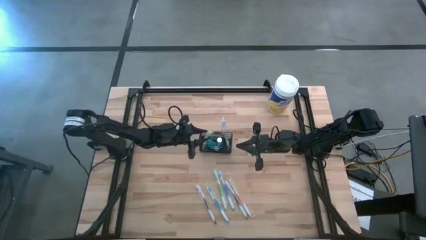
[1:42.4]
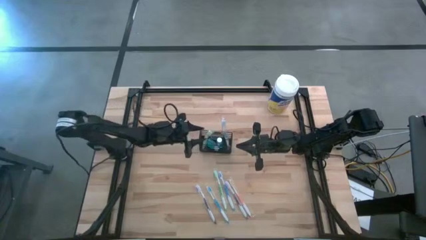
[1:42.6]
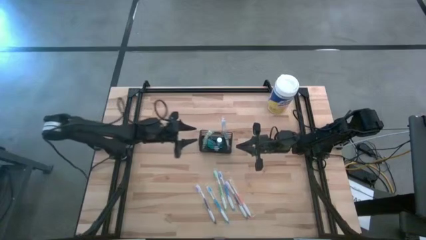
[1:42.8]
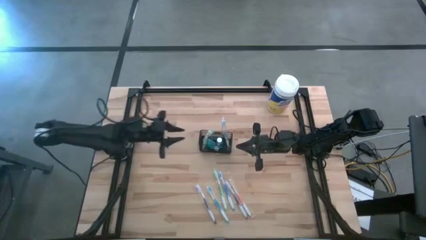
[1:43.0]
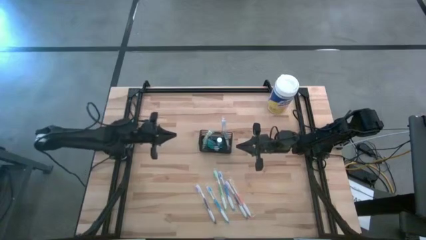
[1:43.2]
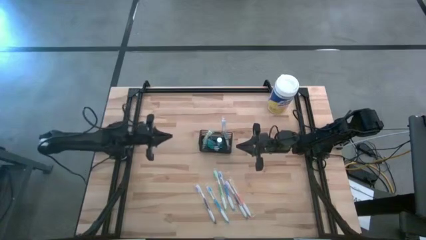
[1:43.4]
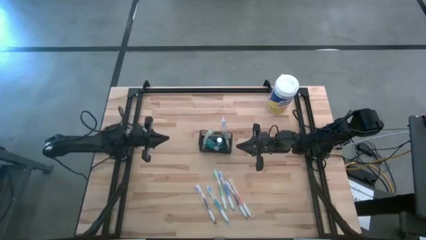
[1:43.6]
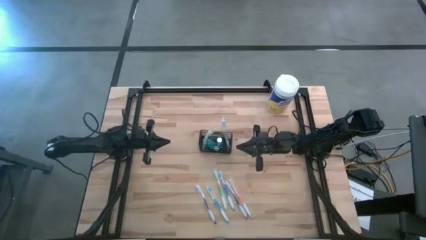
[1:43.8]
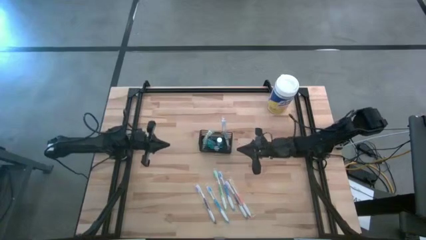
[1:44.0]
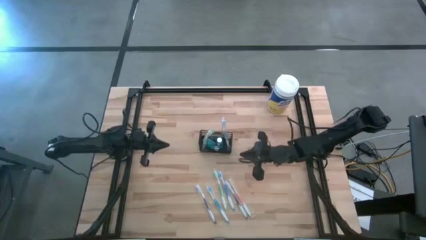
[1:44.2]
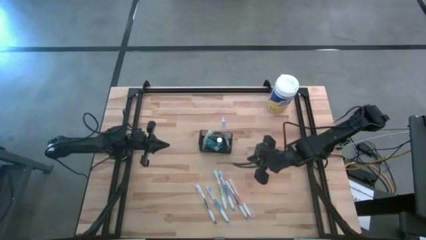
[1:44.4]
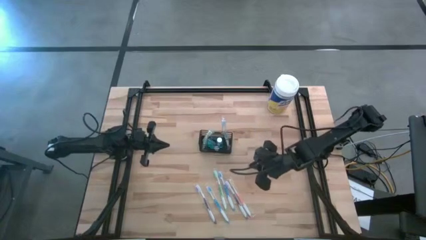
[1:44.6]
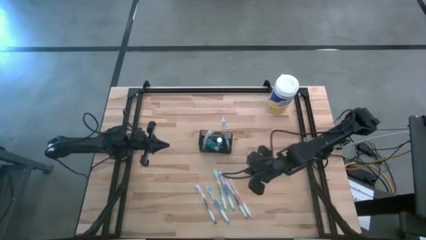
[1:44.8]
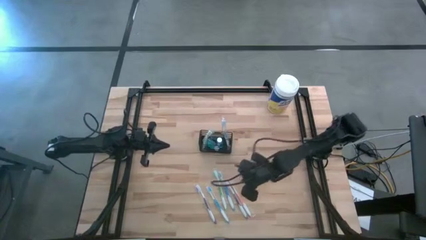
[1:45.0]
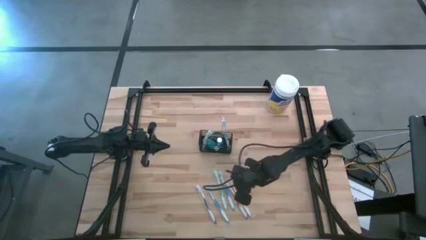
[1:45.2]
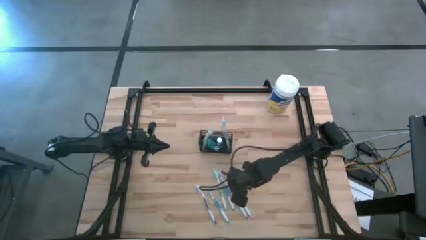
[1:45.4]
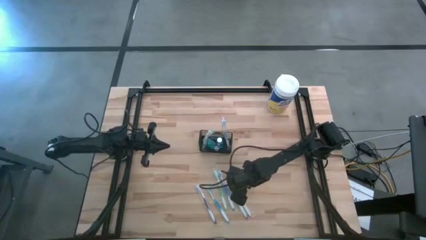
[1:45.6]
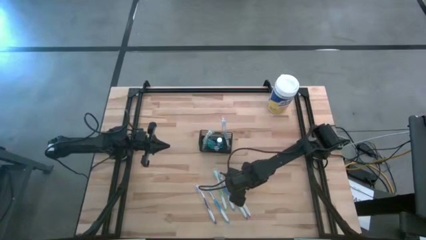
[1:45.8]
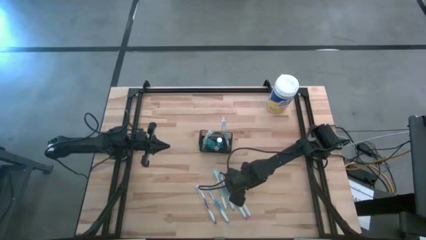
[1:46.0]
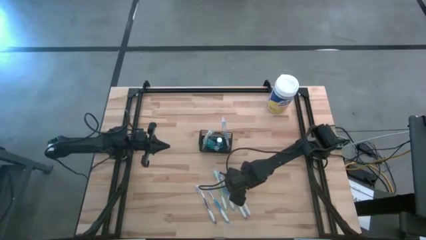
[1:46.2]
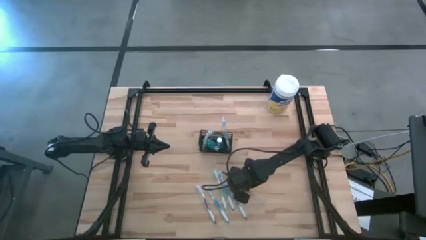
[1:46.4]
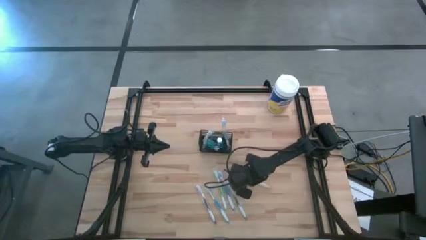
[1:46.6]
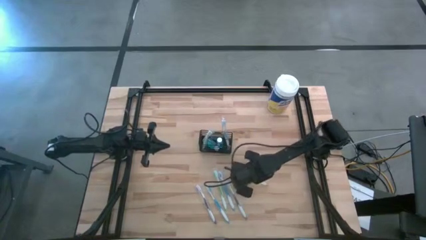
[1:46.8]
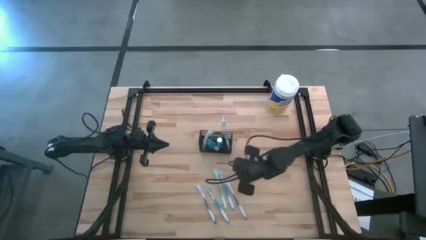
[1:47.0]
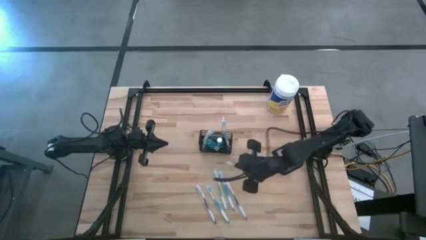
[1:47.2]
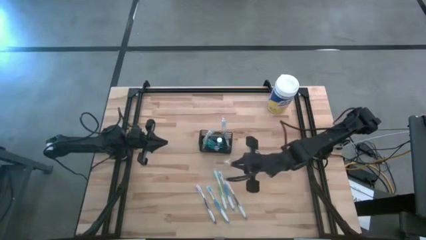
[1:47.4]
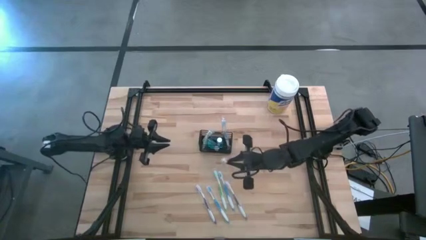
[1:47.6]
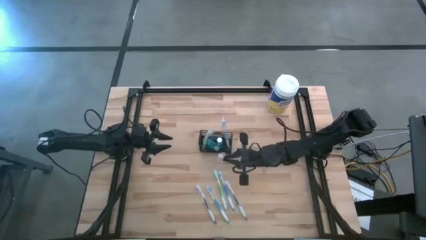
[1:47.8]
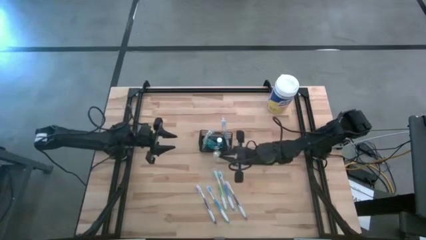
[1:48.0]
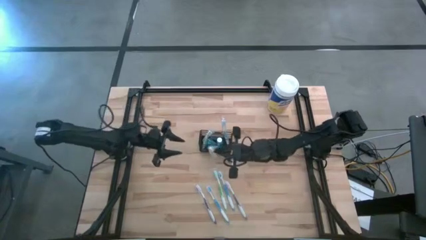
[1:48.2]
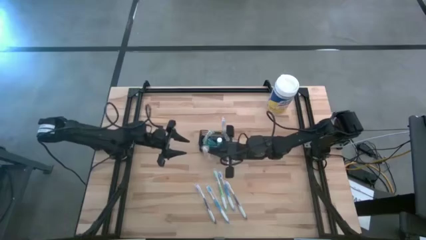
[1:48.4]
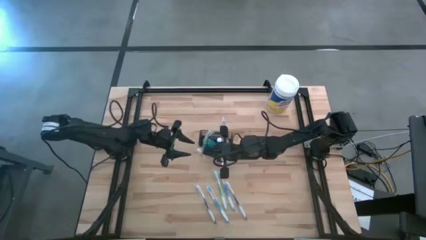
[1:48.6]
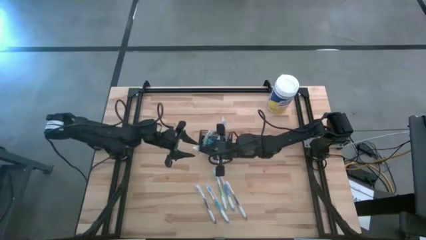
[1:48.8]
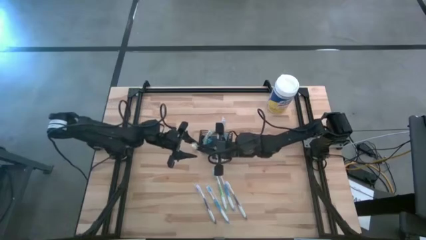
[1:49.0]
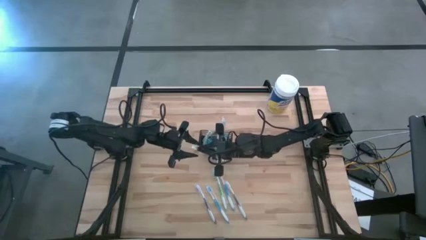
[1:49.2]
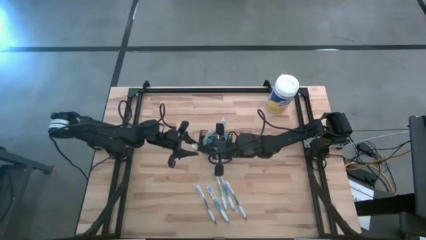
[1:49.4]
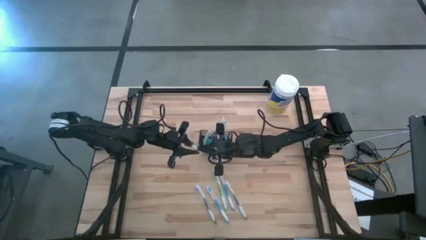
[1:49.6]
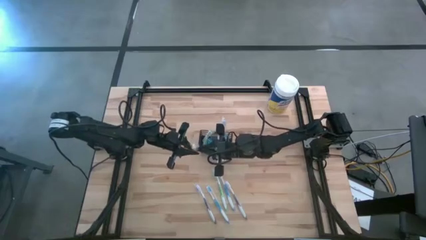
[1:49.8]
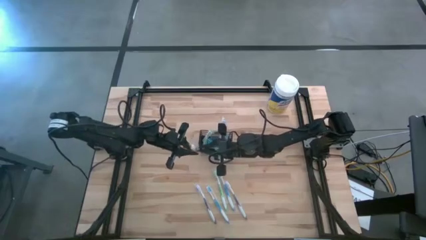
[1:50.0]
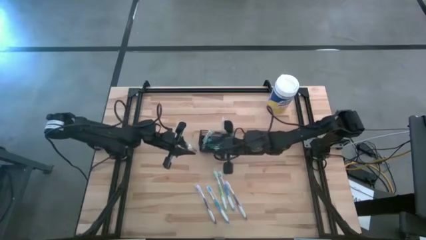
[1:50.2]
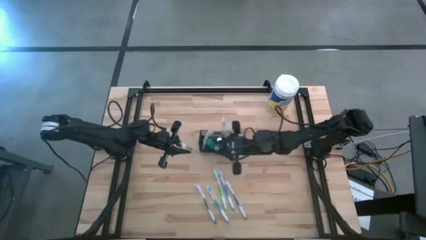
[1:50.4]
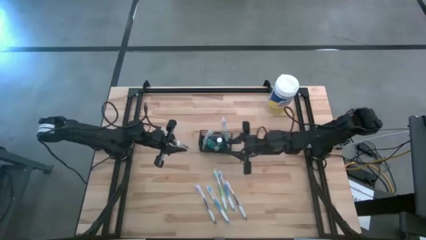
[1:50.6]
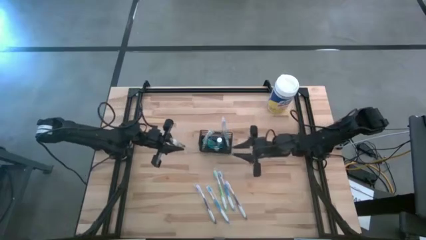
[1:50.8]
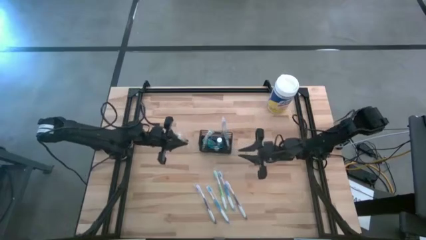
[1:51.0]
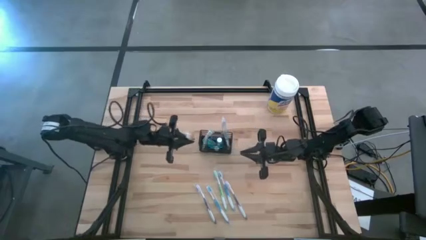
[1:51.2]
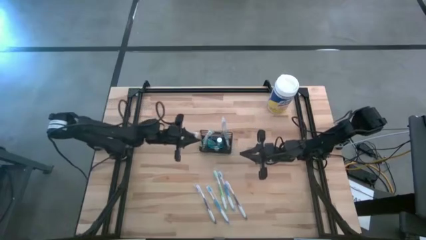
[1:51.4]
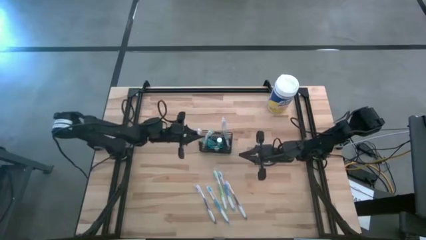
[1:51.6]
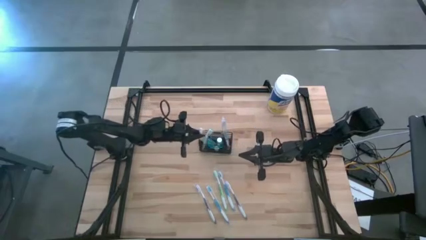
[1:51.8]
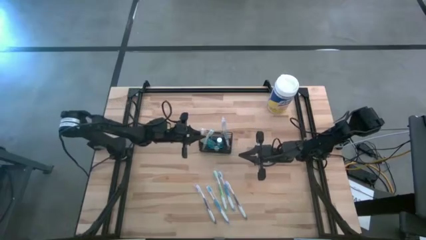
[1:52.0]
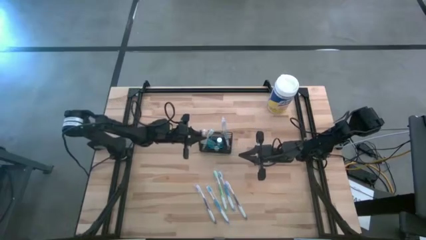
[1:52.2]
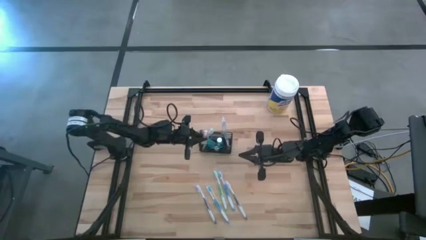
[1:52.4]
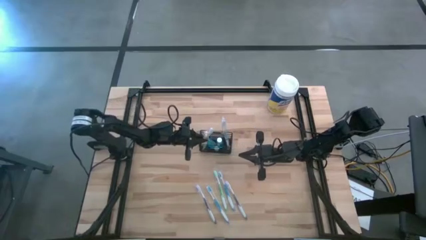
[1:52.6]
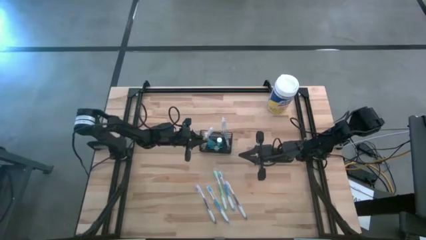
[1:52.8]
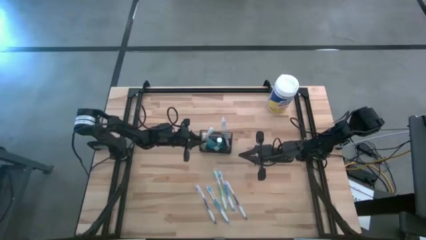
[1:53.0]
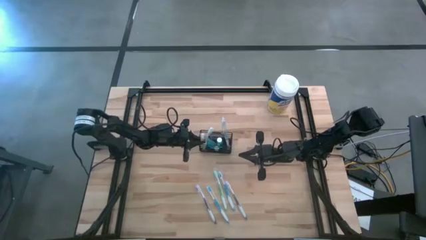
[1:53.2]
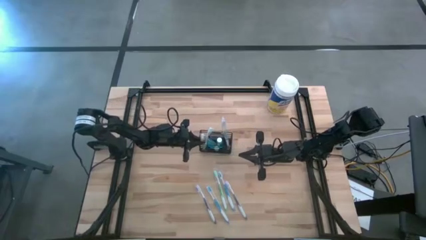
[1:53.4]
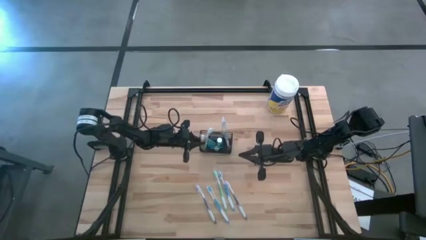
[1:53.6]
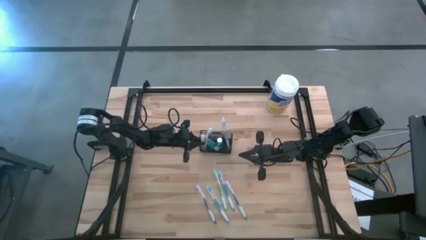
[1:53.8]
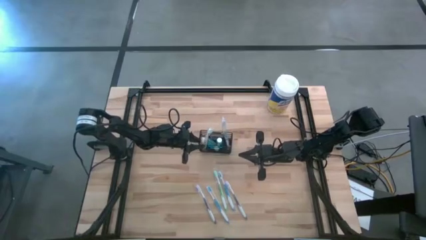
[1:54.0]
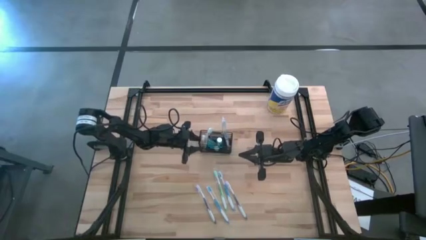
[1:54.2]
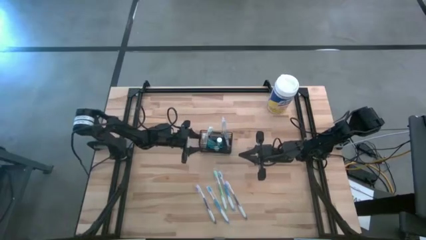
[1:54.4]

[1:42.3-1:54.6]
Task: Pick & Place toothbrushing station
Put the orange toothbrush into the black wire organizer

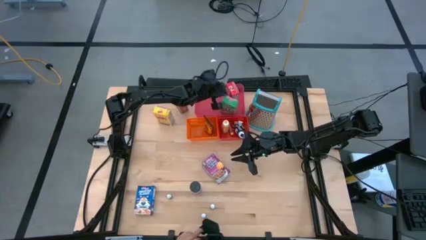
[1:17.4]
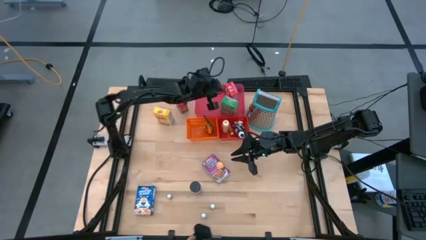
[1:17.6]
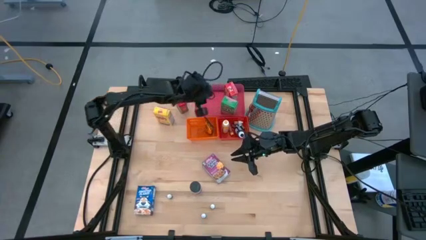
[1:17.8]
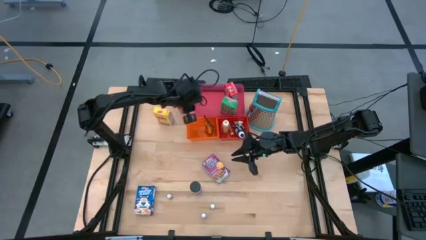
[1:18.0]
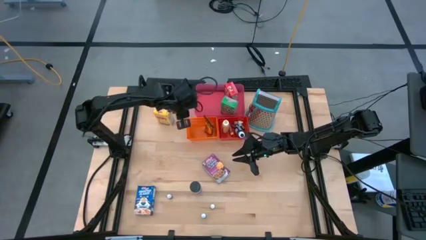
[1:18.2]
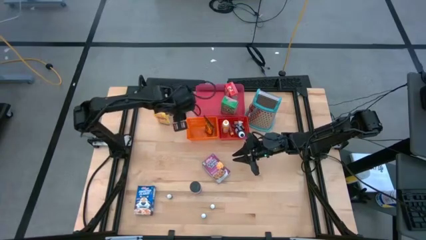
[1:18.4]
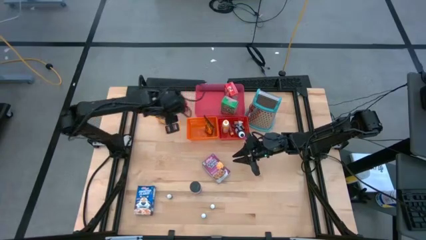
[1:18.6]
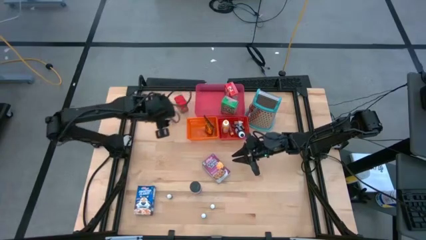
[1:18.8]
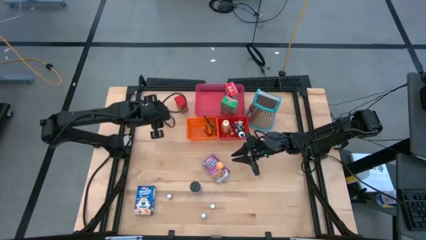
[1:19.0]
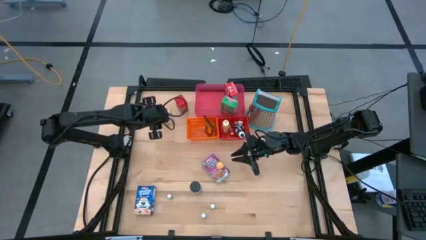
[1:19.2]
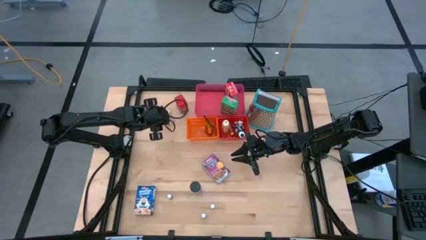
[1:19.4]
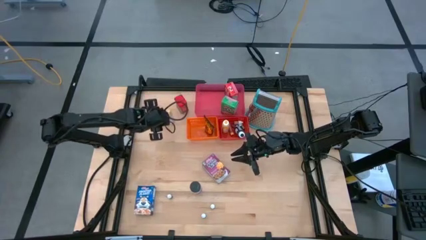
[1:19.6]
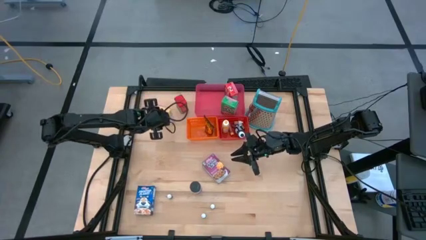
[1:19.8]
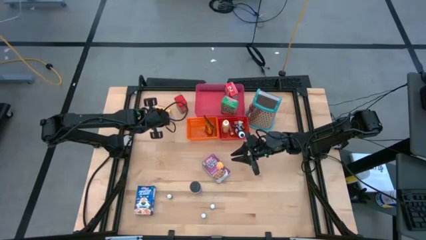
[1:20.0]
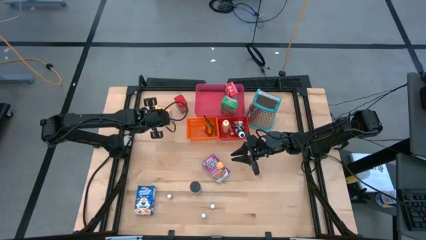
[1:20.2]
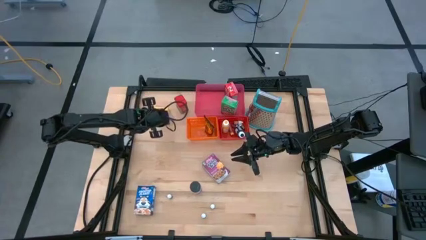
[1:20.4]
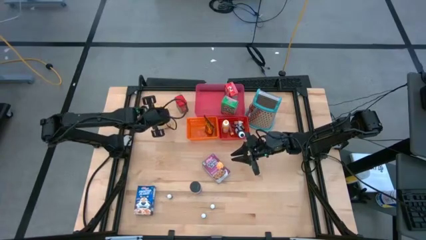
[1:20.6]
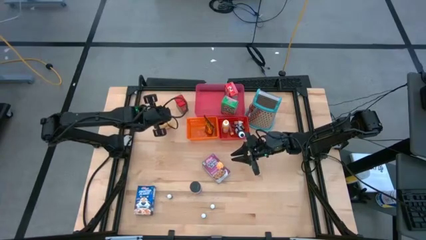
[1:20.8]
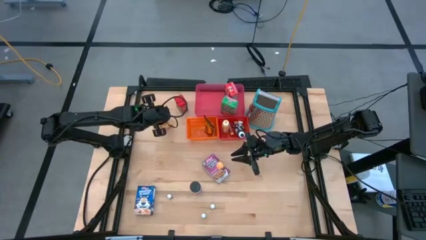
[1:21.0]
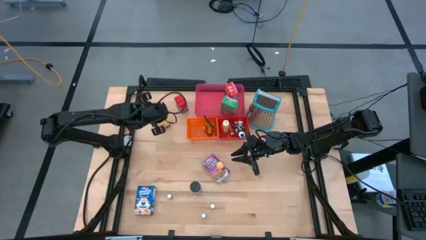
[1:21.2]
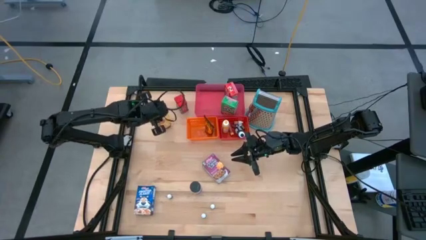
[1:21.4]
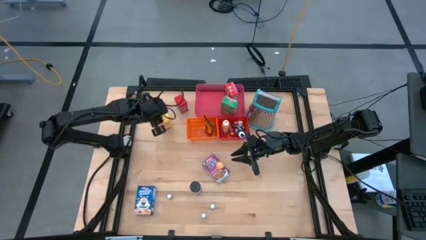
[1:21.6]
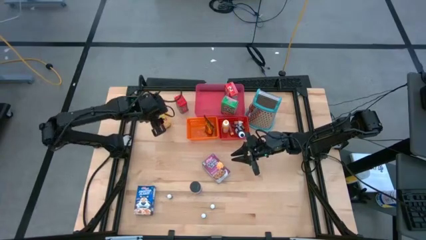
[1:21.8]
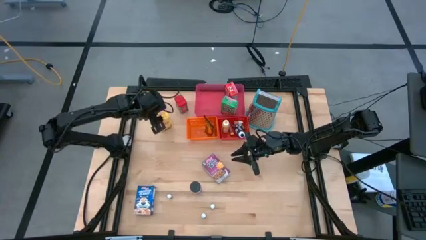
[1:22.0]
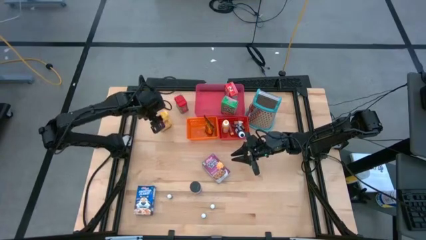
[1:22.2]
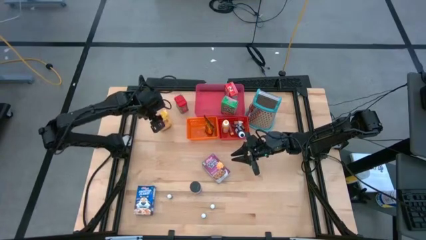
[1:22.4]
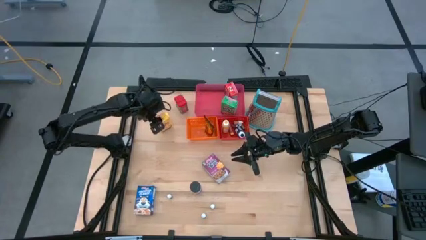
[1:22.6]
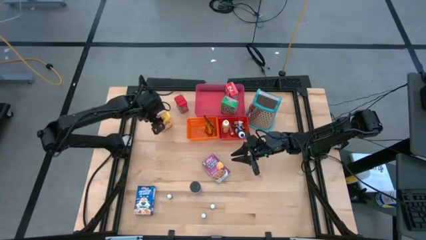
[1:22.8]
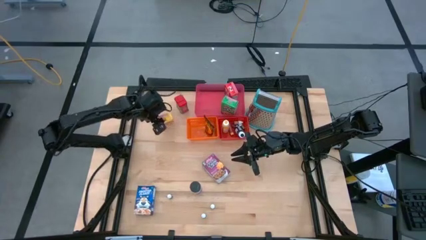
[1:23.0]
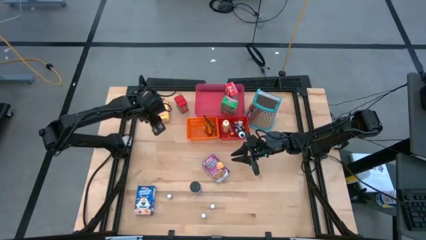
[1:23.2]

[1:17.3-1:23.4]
Task: Pick & Place Kitchen Items
Put the yellow cereal box into the pink bin
